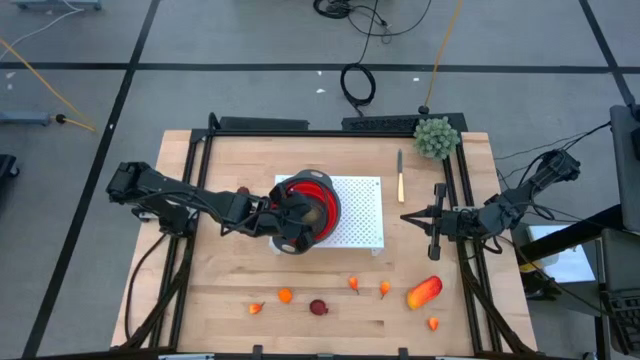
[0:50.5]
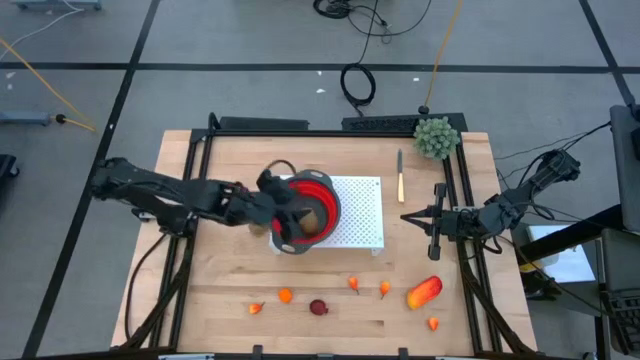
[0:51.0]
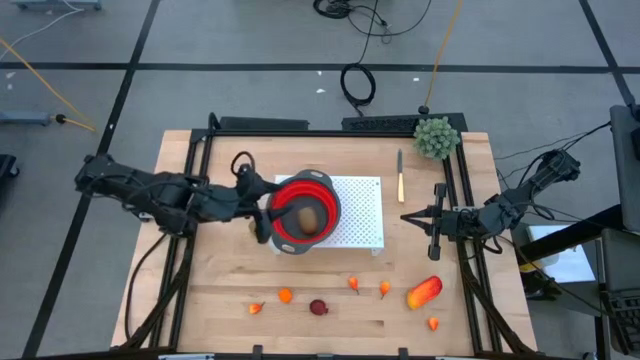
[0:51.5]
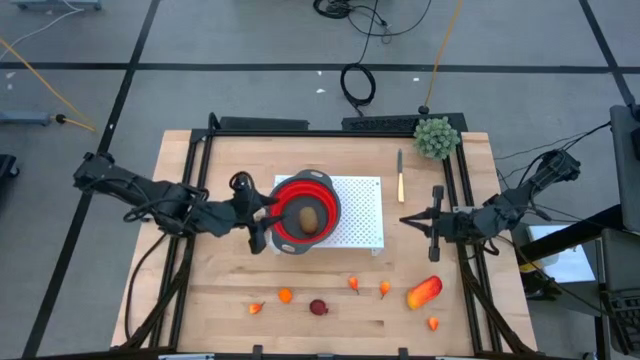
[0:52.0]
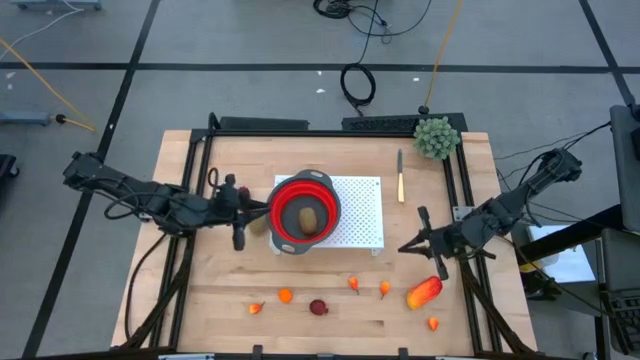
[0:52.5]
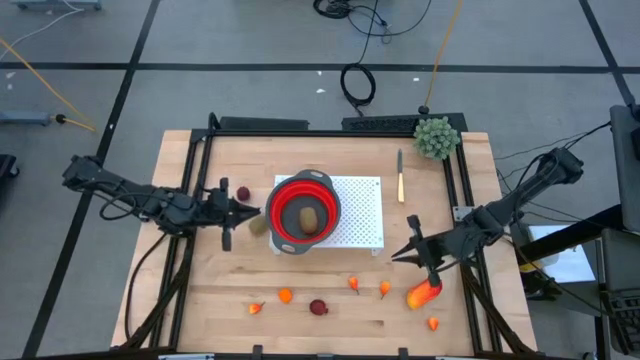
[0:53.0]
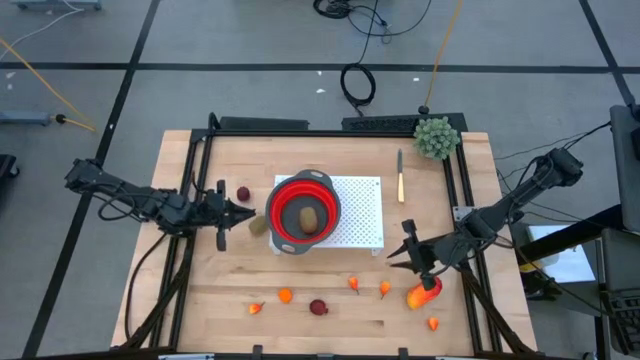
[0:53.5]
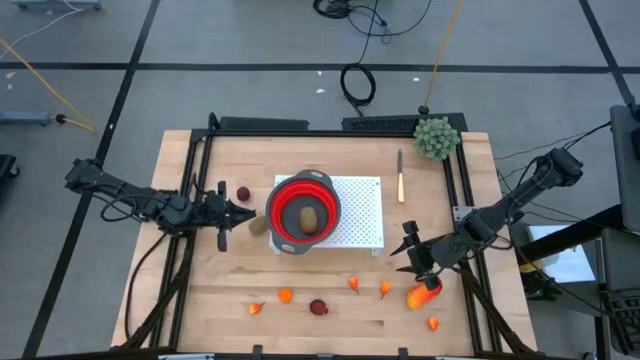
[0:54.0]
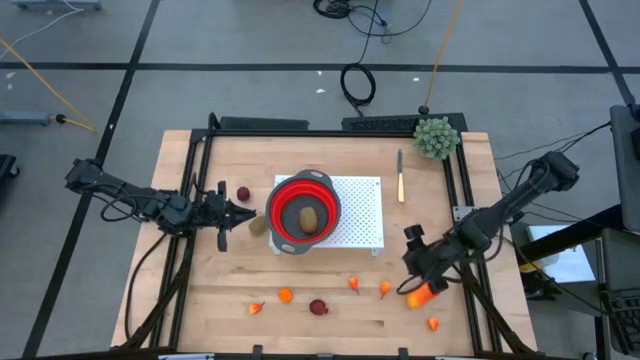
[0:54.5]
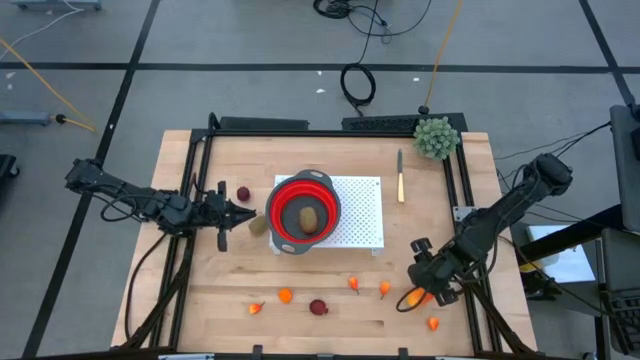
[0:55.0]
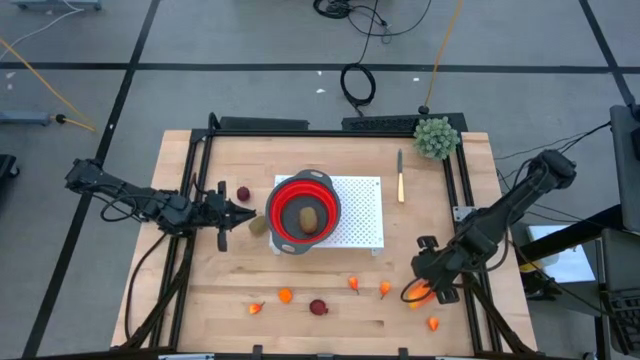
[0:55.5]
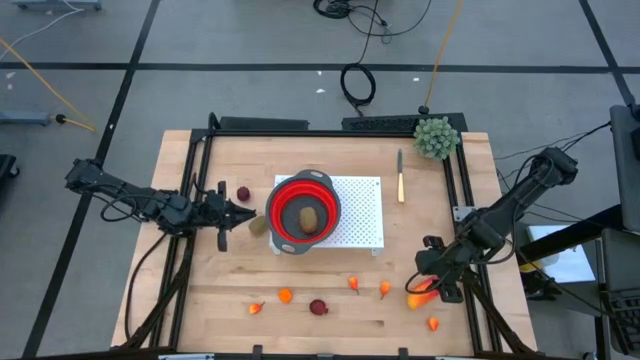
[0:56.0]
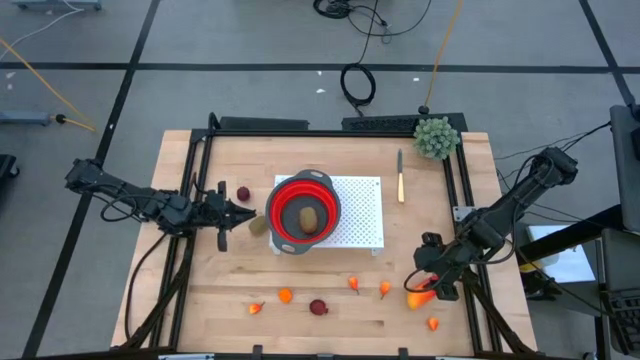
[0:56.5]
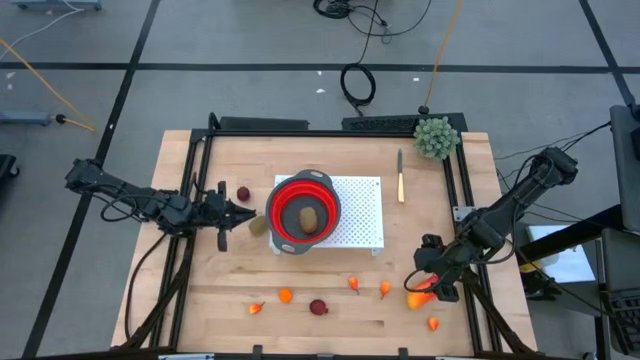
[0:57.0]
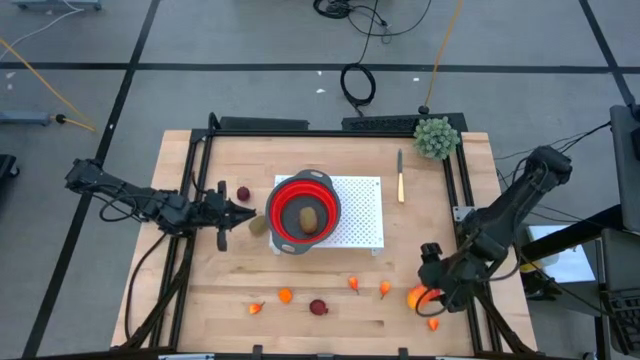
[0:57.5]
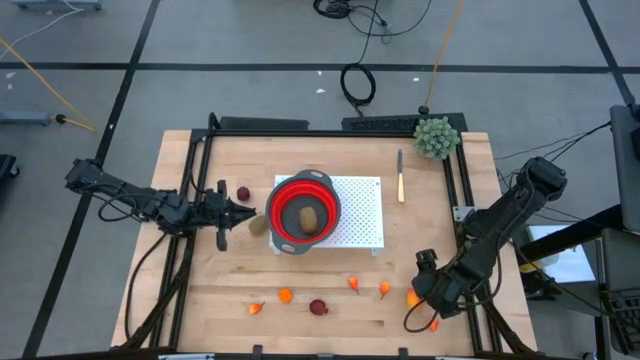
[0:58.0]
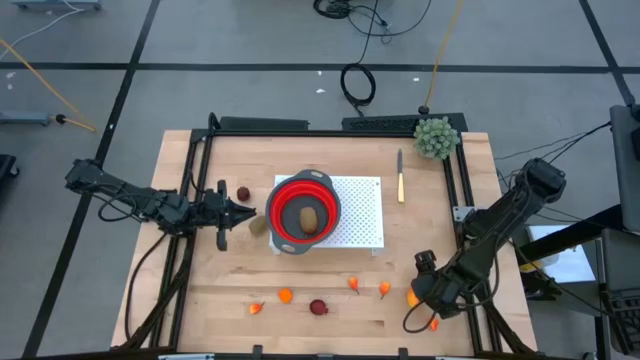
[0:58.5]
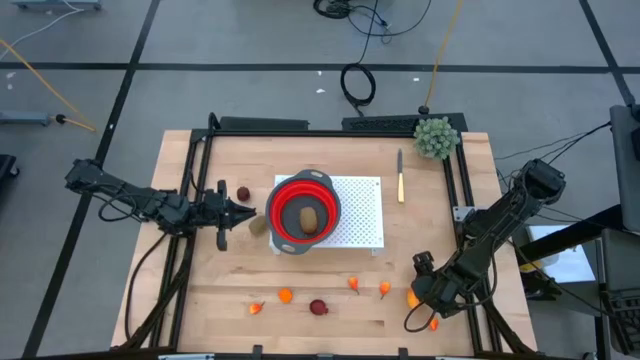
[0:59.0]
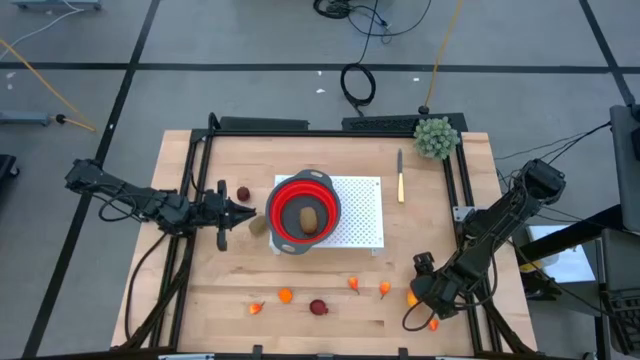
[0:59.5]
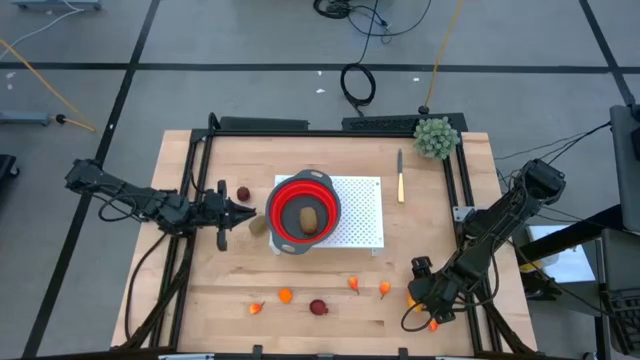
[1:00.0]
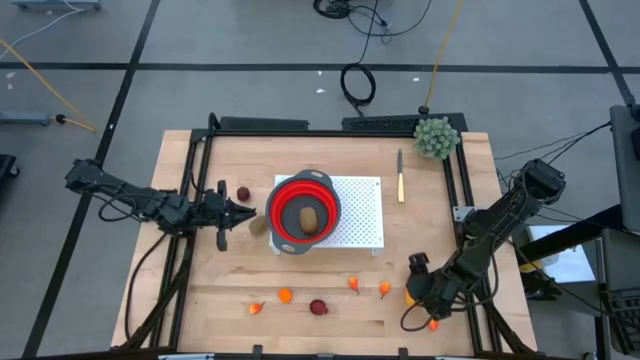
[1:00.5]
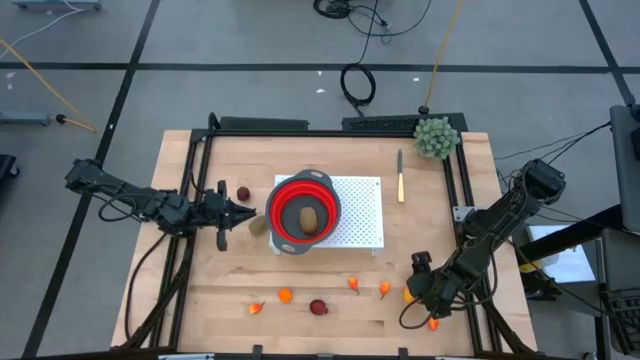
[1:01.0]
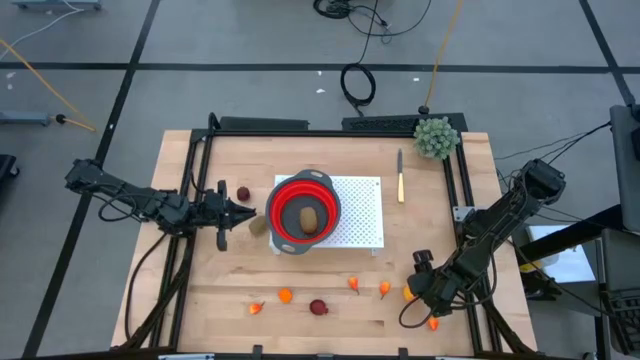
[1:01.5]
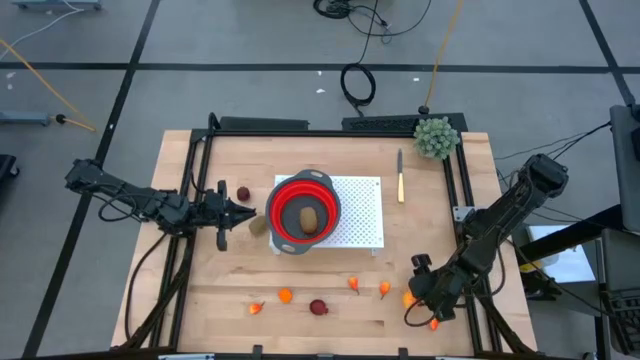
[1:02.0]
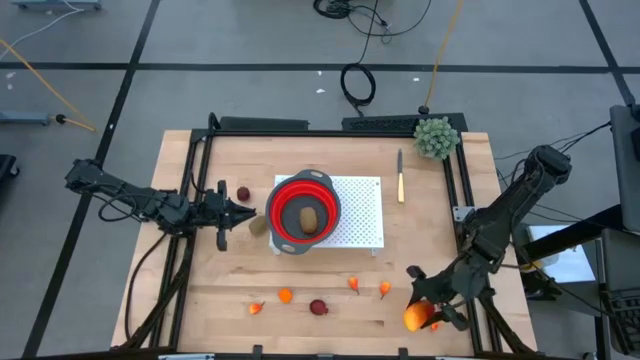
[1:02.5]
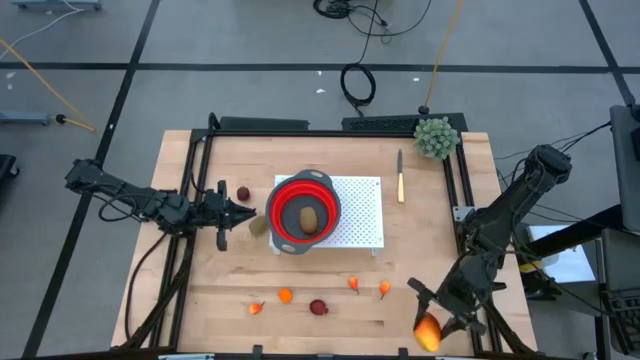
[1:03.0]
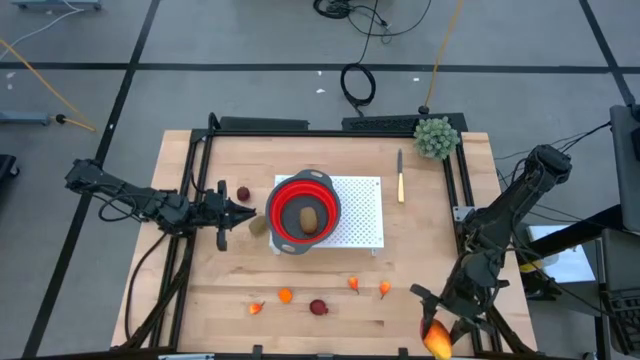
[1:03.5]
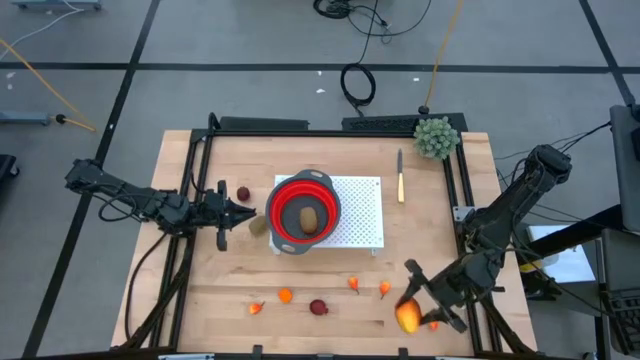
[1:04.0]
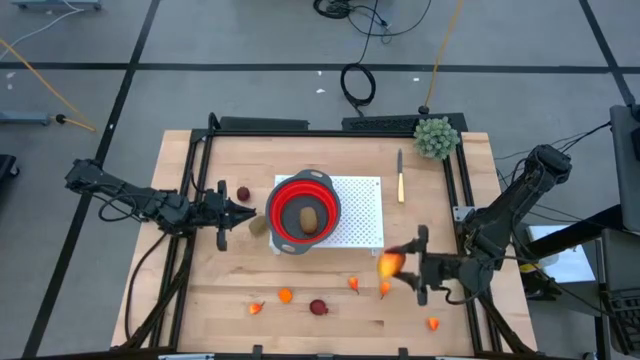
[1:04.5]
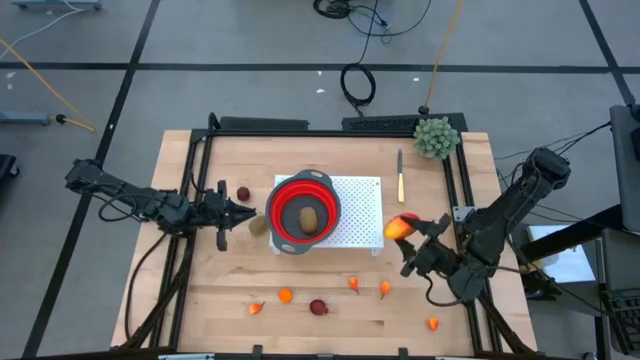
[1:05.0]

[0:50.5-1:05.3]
Task: Pick & Place Fruit
Put the mango into the strainer bowl on the shelf
